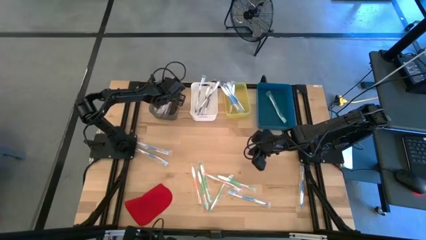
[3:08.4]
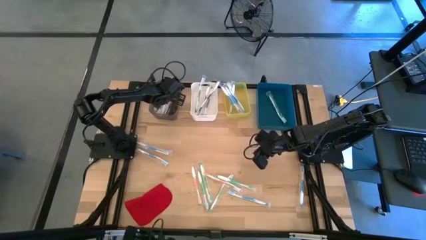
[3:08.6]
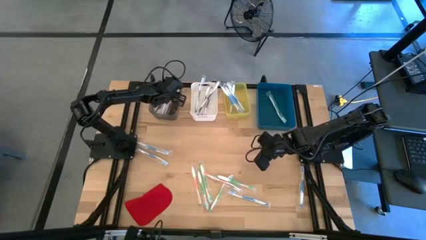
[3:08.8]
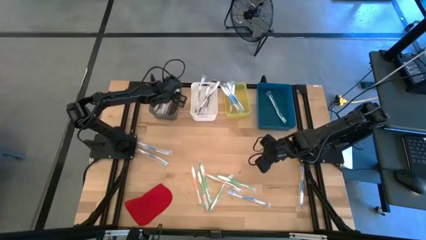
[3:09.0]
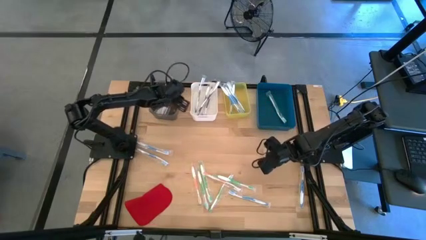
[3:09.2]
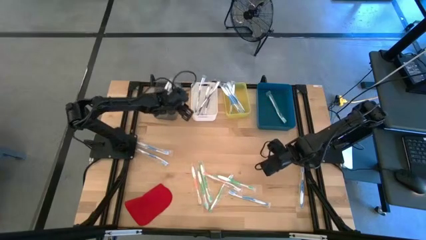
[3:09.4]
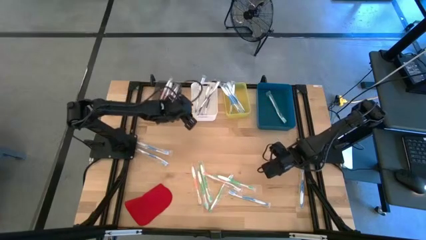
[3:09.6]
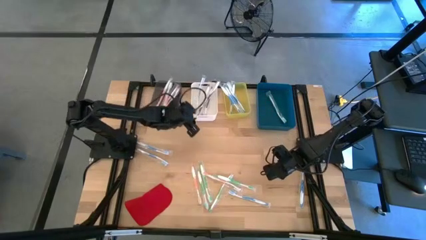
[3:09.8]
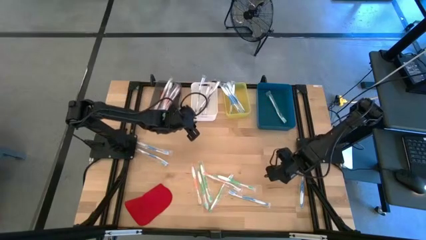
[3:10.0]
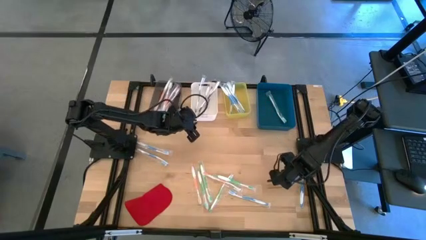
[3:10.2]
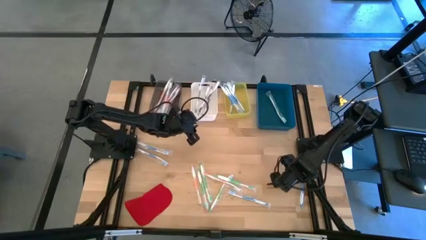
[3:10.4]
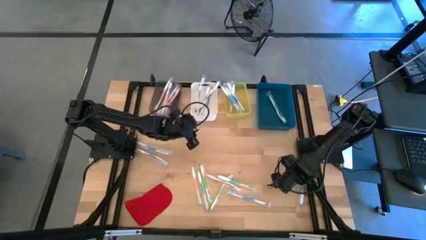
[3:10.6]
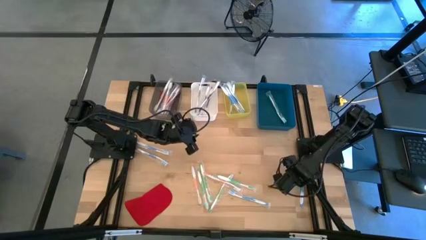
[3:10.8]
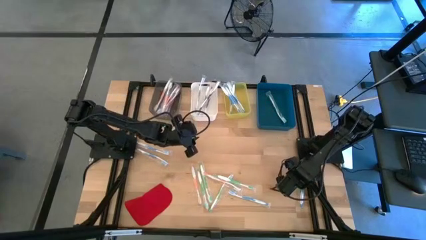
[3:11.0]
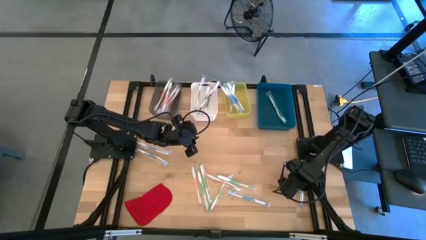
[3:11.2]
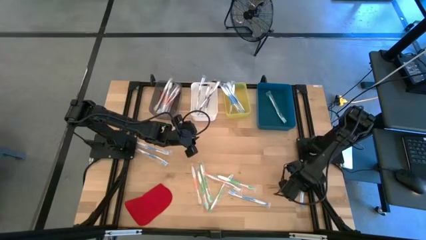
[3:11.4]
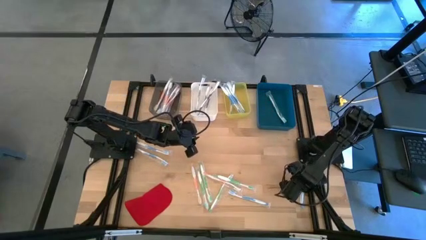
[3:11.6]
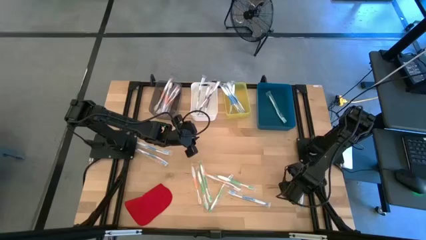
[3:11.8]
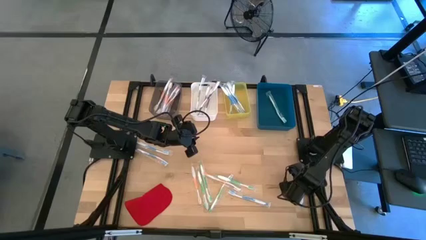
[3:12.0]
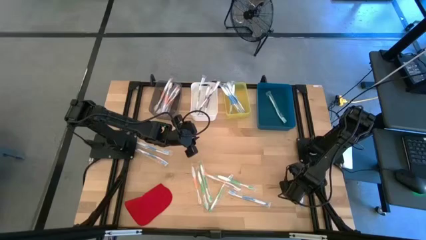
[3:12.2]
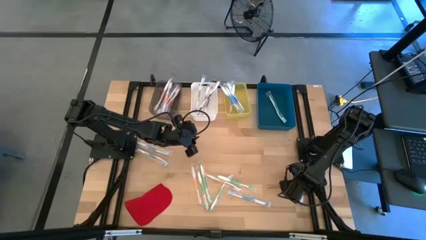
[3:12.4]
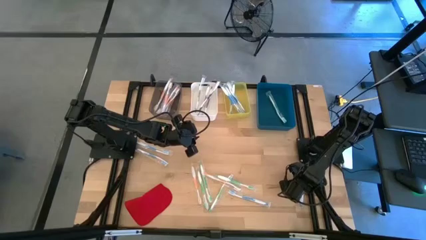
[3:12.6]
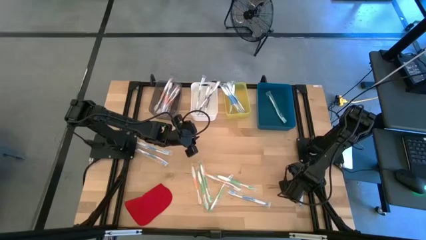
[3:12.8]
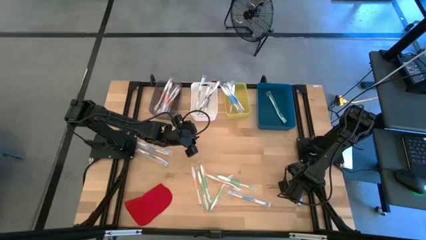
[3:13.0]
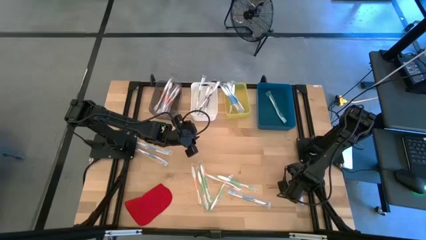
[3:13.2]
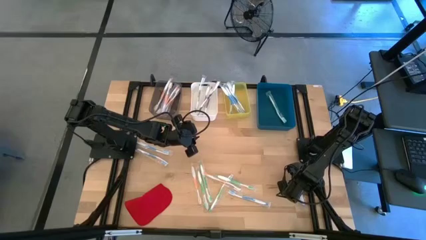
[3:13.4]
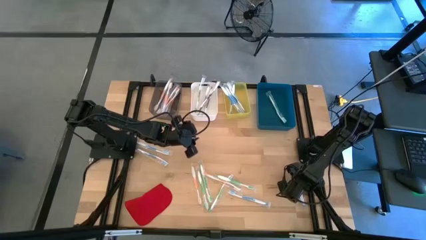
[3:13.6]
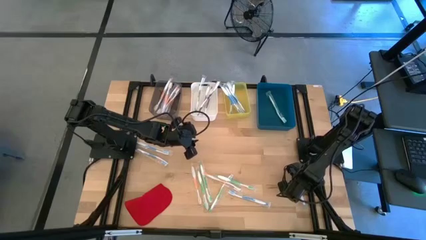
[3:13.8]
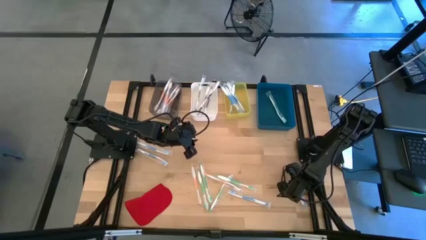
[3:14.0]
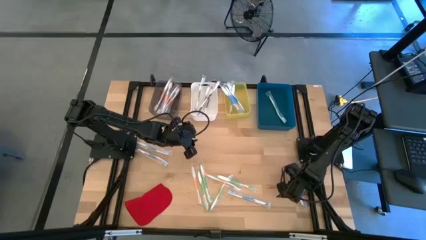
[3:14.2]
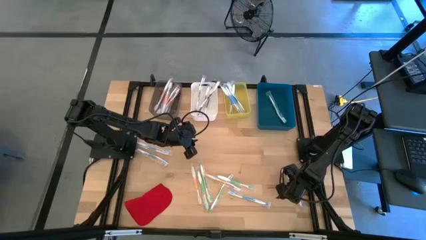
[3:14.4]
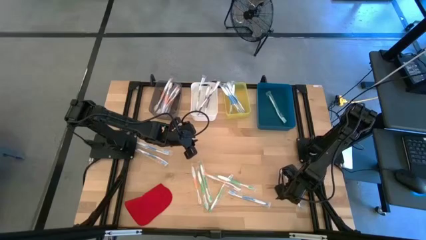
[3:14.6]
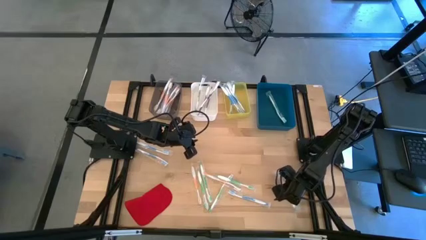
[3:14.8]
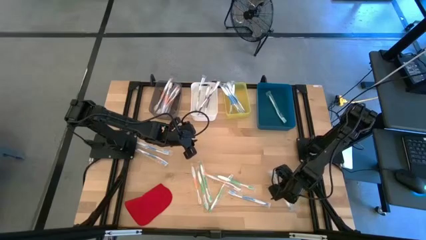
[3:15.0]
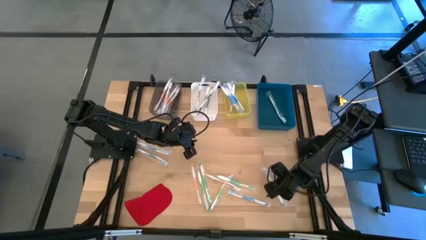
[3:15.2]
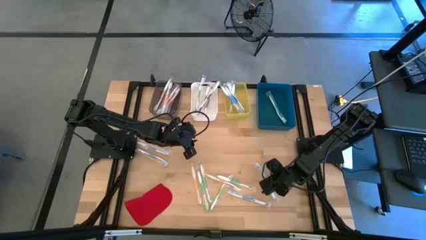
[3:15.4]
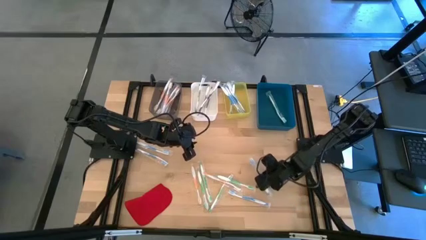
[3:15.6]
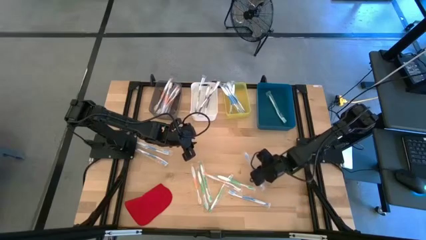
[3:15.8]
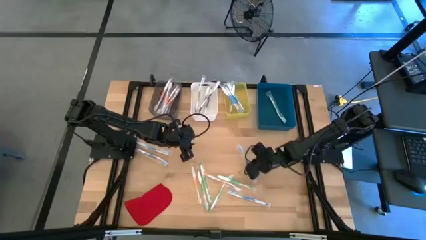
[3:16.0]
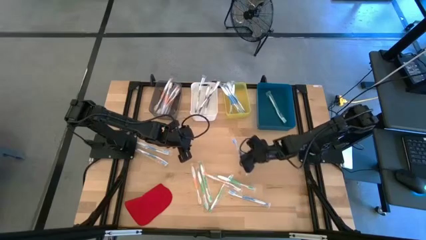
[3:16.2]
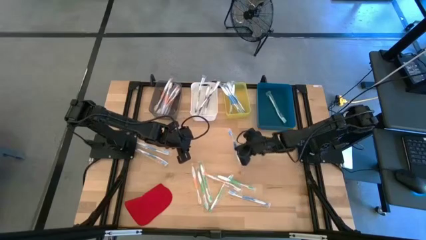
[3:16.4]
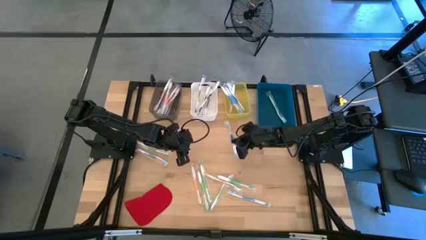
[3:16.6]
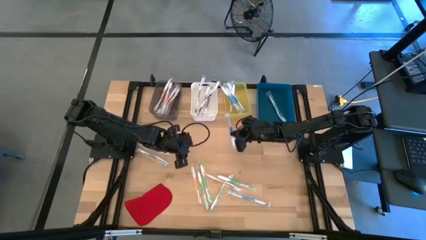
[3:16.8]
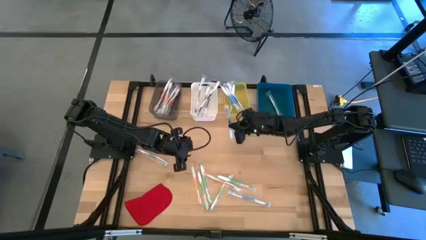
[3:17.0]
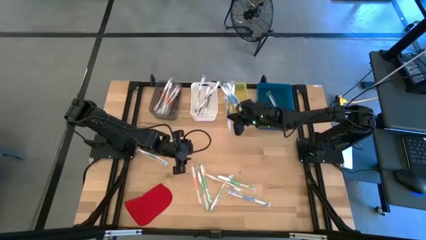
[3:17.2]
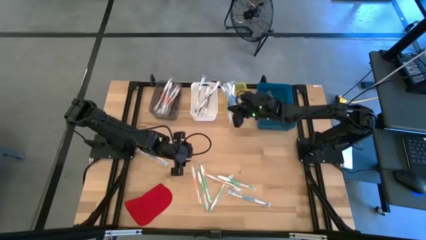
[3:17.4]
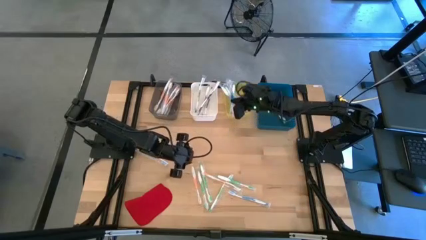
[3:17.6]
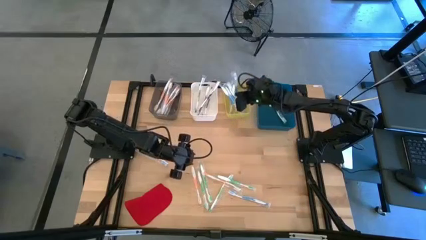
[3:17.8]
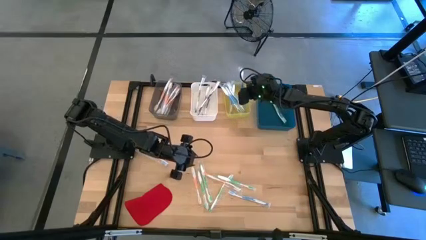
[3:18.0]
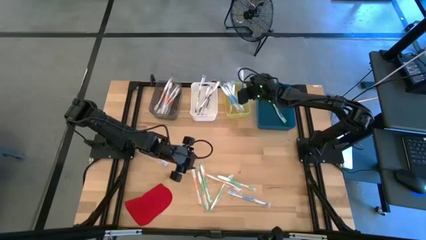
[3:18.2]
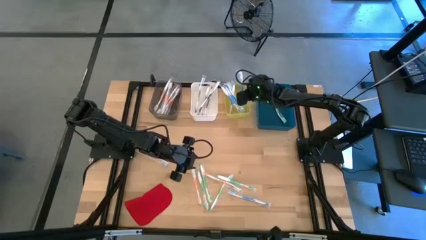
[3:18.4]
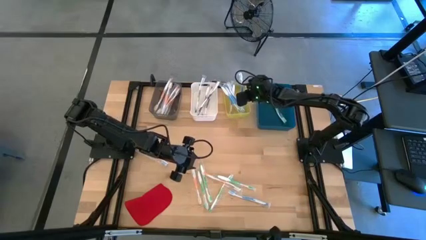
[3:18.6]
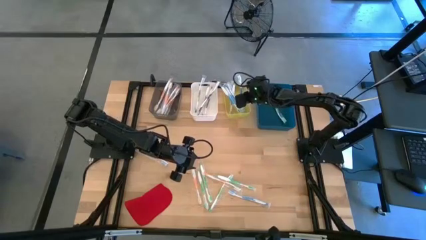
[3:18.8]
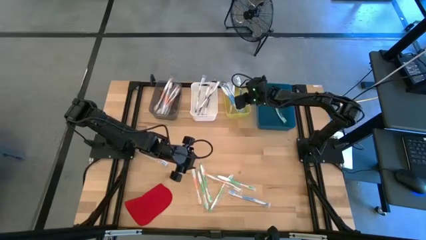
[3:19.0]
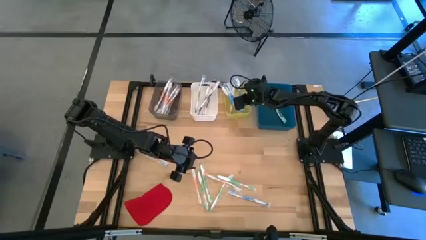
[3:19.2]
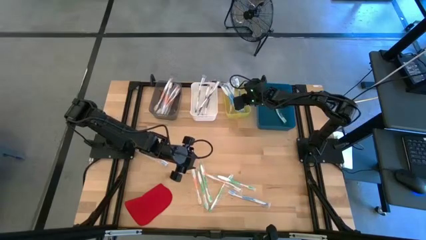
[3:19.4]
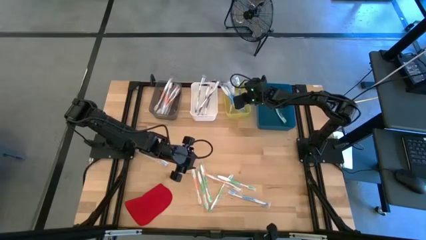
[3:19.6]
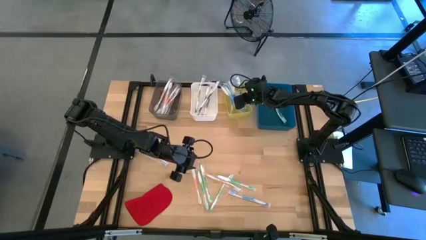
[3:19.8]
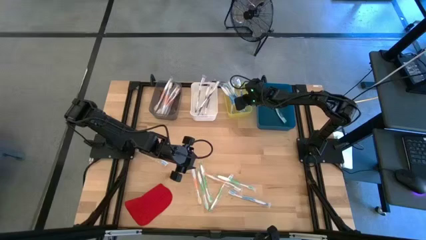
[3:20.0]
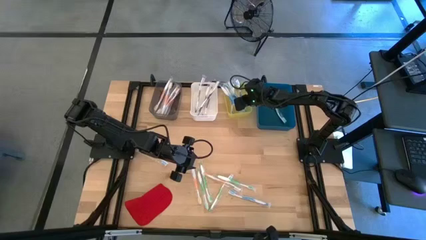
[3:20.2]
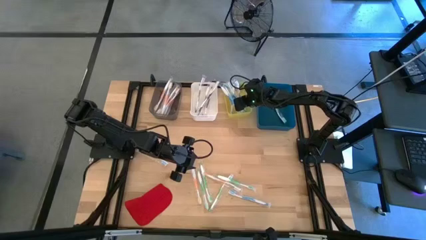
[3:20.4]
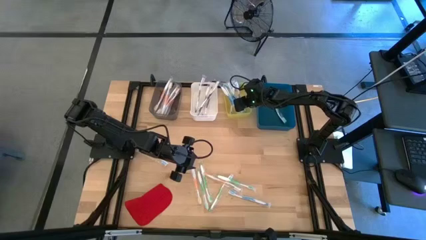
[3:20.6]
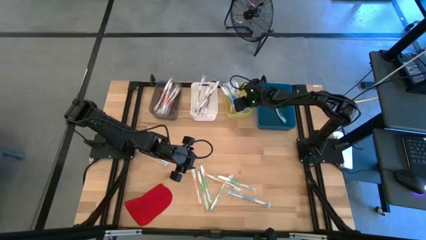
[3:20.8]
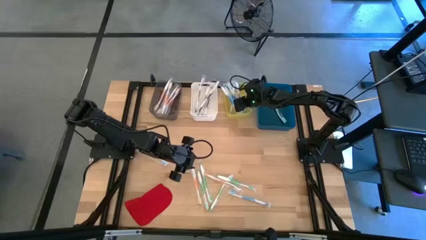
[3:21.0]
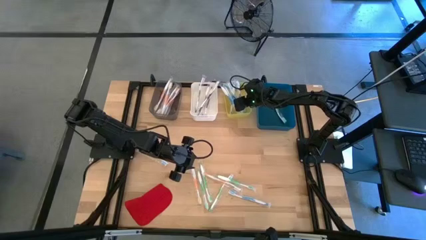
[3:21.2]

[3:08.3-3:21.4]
Task: Pick & Place Toothbrushes
Put the blue toothbrush into the yellow bin

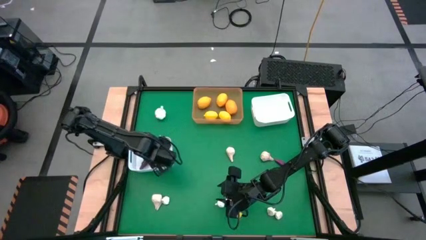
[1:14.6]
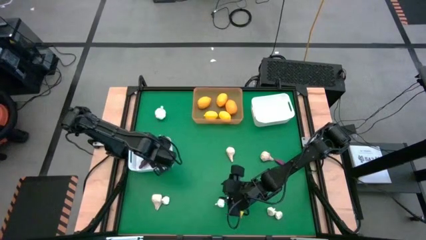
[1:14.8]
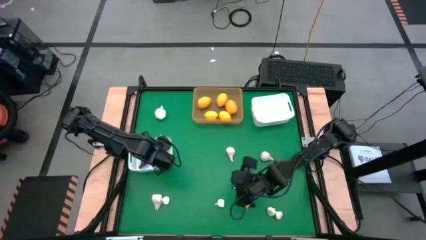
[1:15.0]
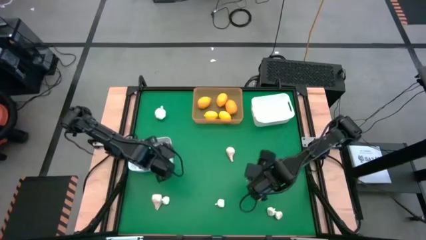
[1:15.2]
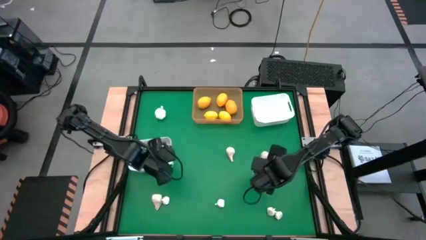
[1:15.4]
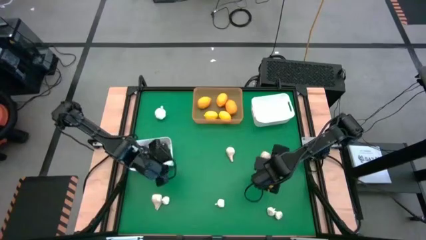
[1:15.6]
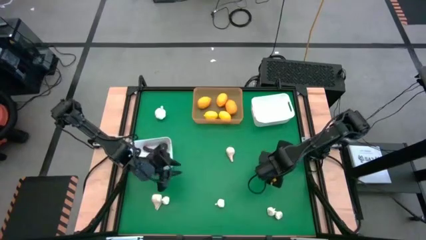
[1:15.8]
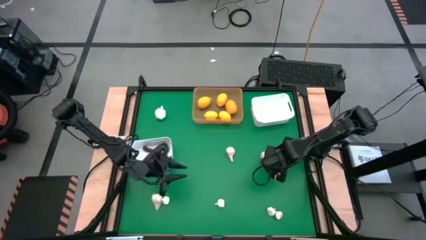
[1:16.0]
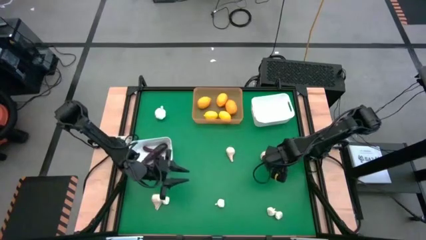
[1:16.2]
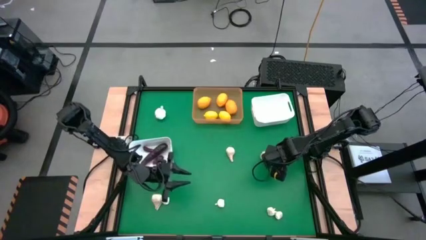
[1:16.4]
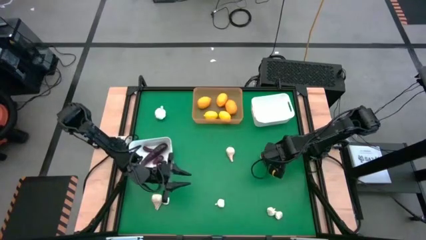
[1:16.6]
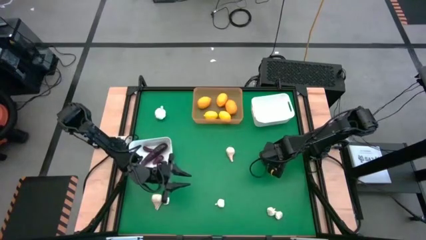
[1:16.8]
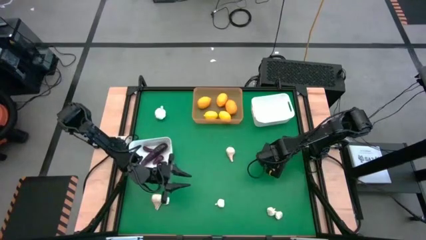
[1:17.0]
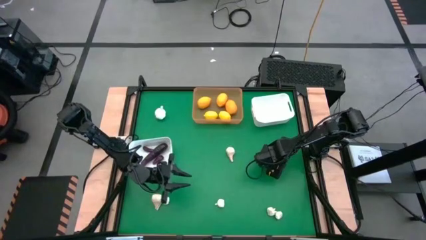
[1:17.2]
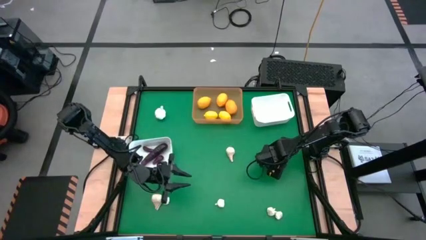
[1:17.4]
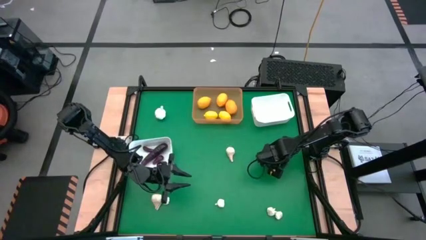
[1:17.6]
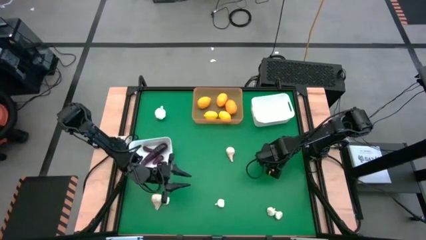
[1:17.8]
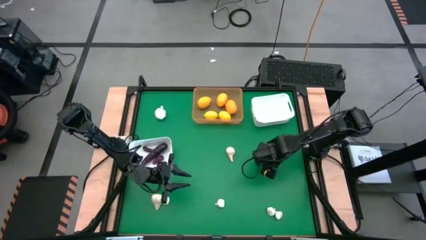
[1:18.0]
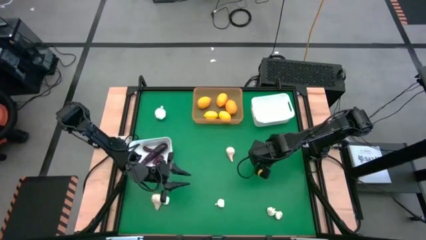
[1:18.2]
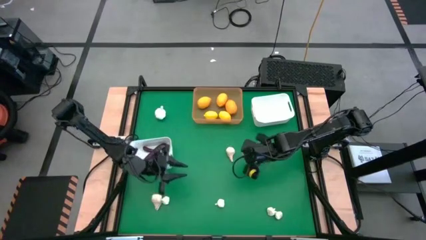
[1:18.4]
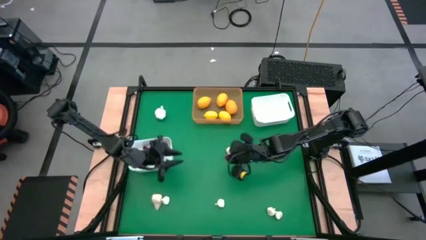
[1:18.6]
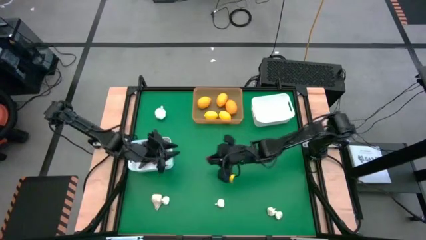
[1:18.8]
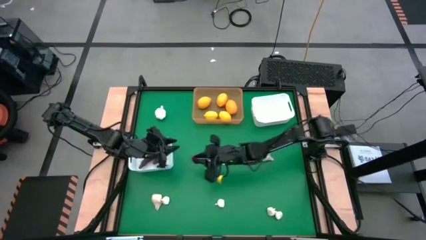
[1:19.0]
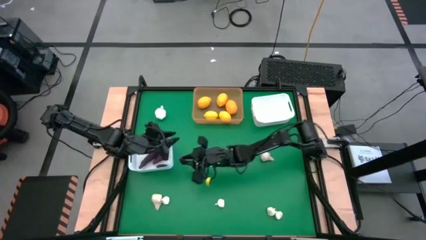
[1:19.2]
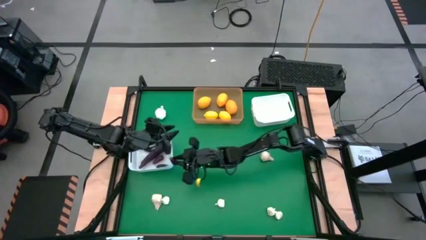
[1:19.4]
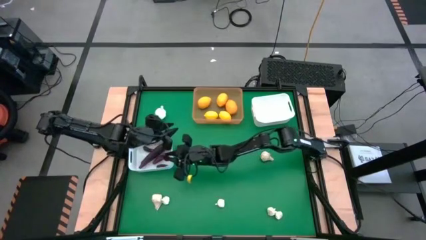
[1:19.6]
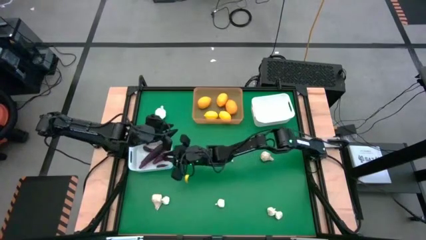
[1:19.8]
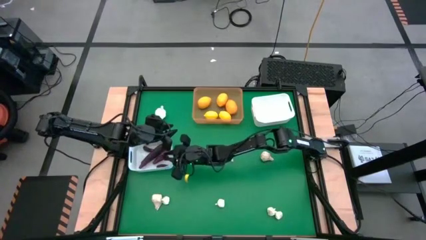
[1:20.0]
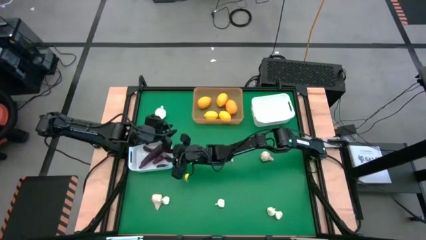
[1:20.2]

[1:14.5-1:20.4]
Task: Sort produce into baskets
Put the eggplant into the left white bin
